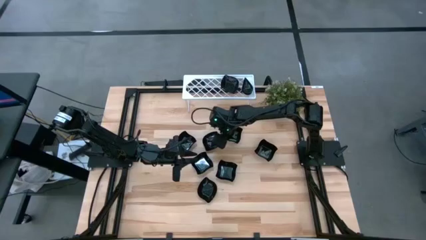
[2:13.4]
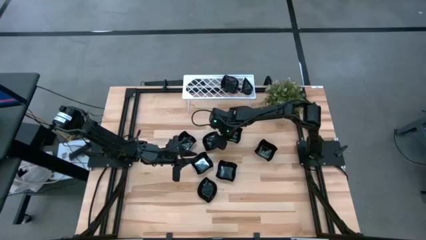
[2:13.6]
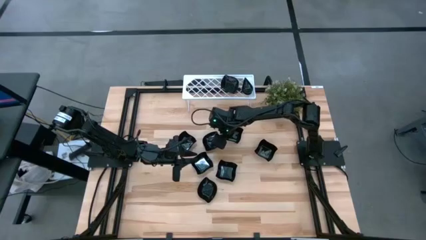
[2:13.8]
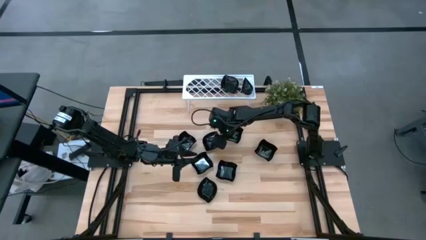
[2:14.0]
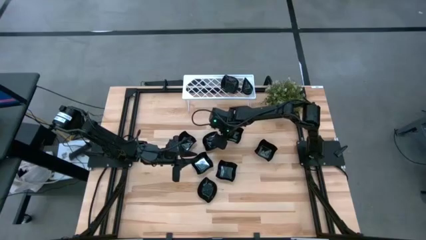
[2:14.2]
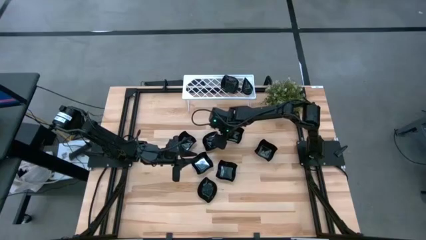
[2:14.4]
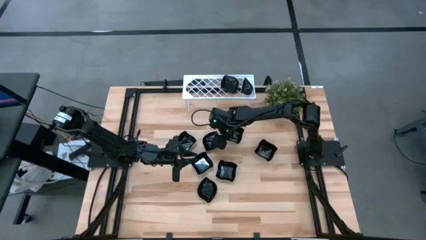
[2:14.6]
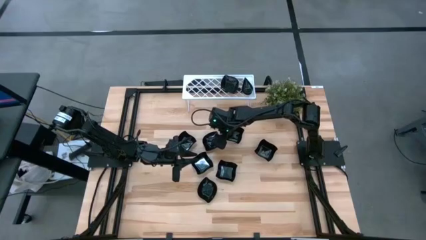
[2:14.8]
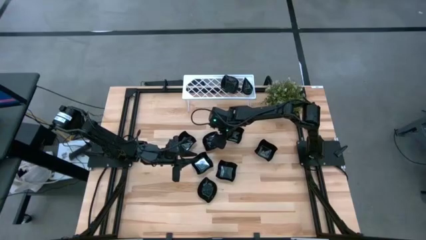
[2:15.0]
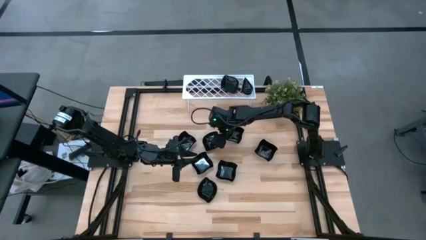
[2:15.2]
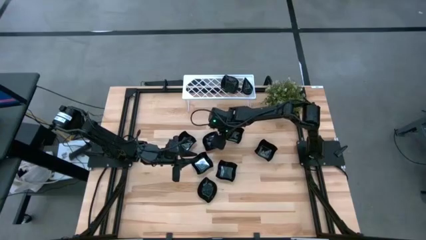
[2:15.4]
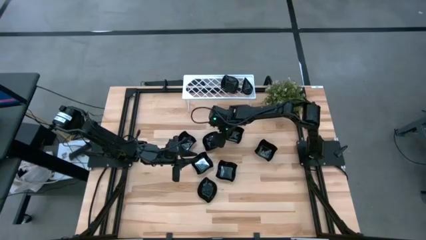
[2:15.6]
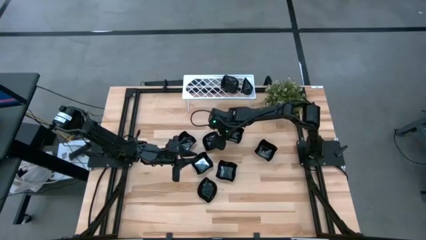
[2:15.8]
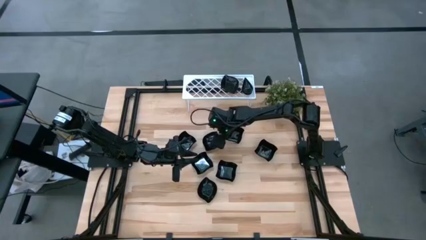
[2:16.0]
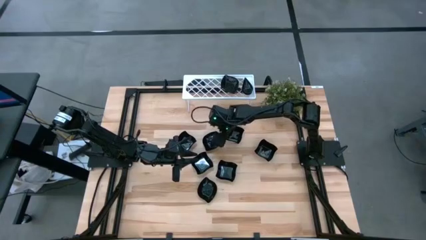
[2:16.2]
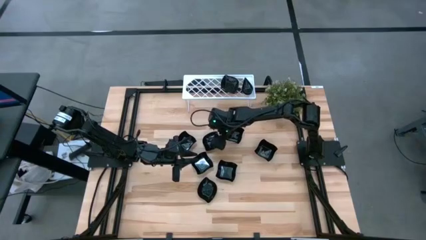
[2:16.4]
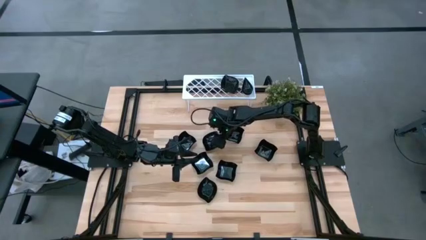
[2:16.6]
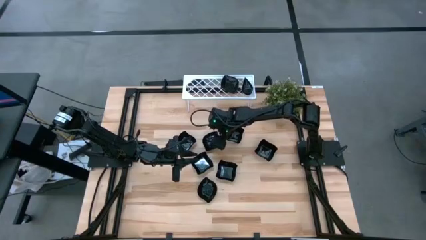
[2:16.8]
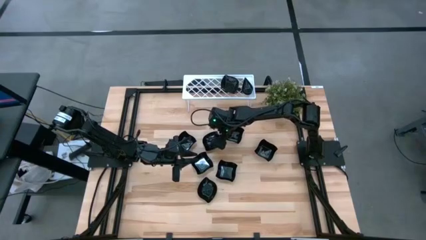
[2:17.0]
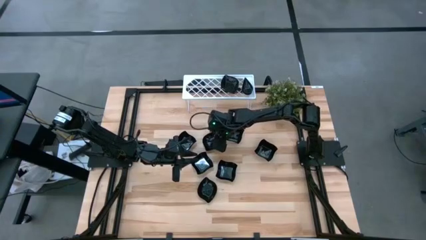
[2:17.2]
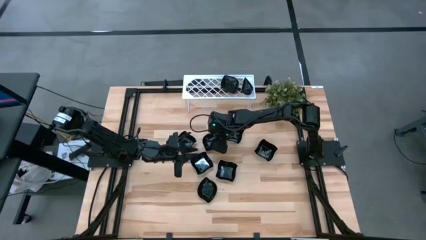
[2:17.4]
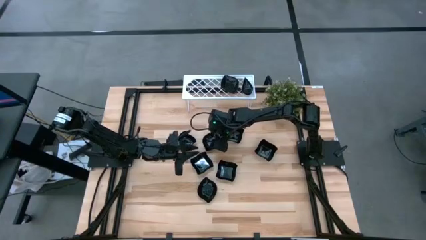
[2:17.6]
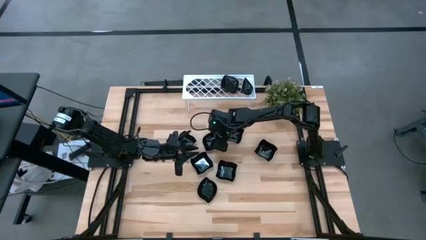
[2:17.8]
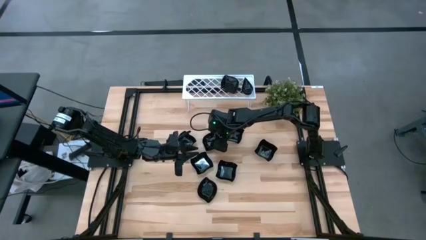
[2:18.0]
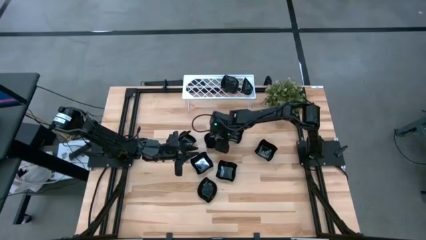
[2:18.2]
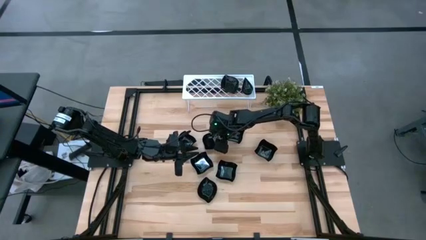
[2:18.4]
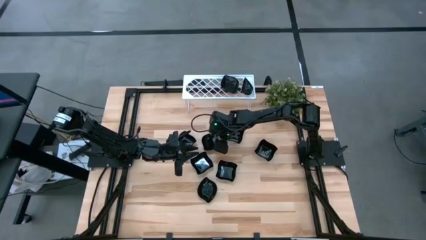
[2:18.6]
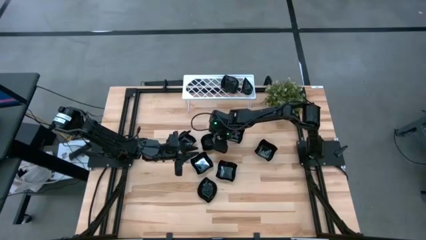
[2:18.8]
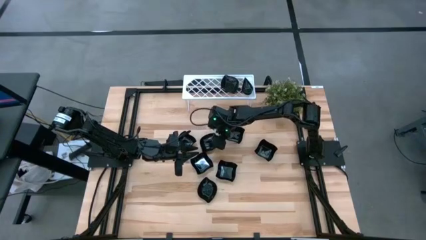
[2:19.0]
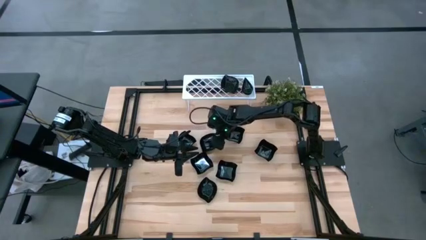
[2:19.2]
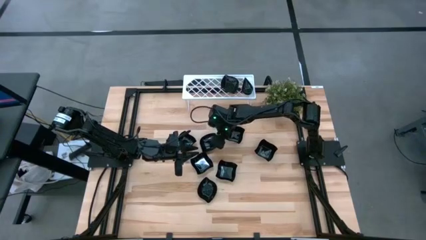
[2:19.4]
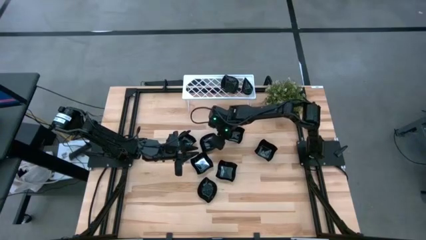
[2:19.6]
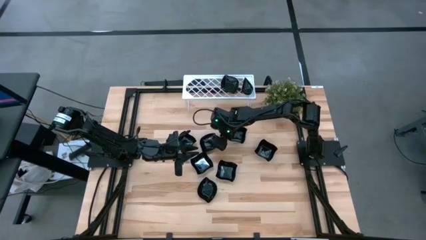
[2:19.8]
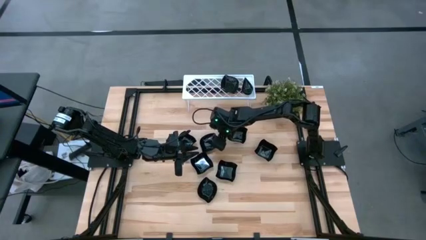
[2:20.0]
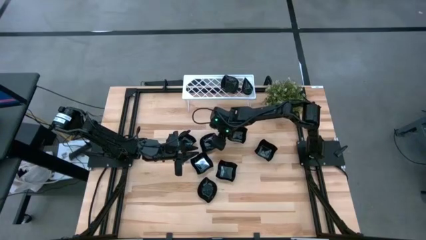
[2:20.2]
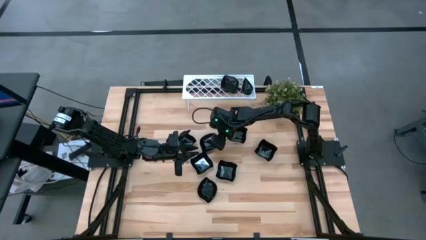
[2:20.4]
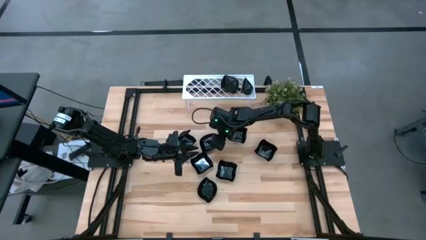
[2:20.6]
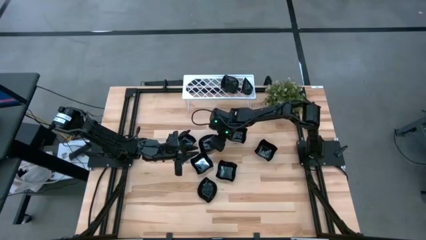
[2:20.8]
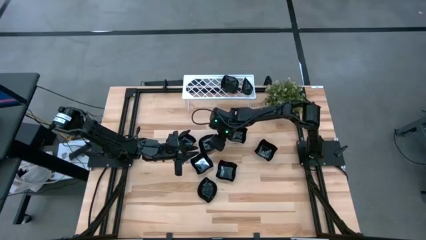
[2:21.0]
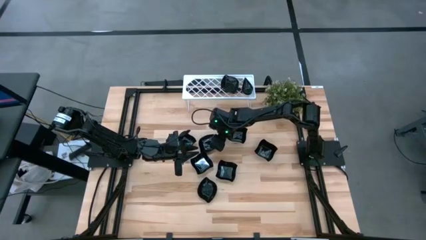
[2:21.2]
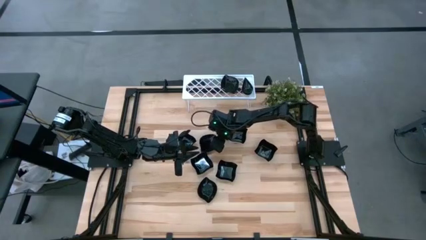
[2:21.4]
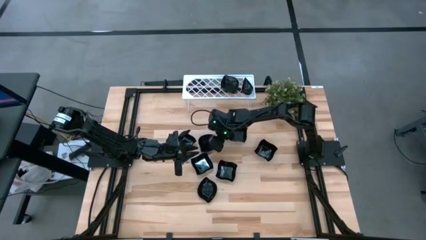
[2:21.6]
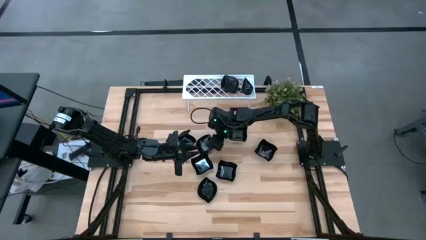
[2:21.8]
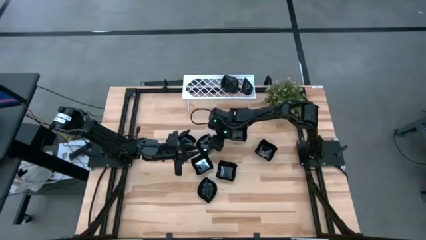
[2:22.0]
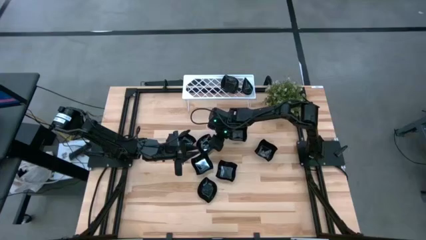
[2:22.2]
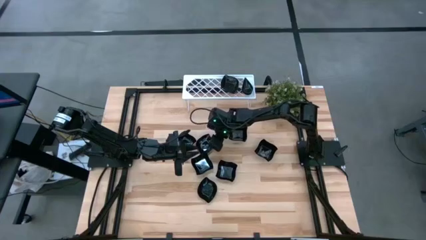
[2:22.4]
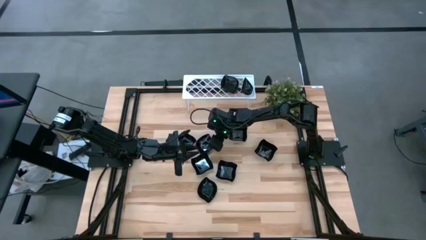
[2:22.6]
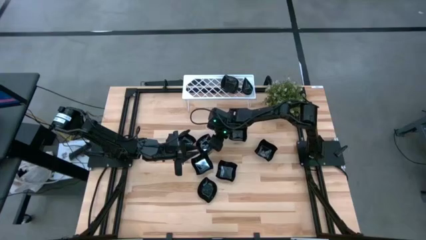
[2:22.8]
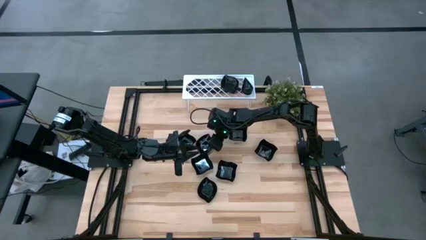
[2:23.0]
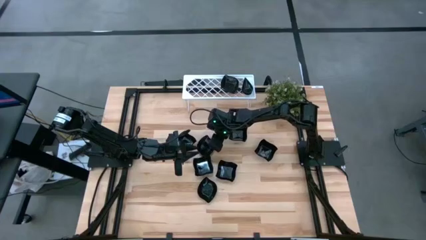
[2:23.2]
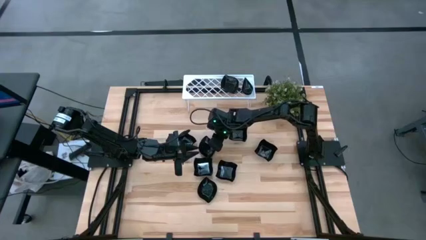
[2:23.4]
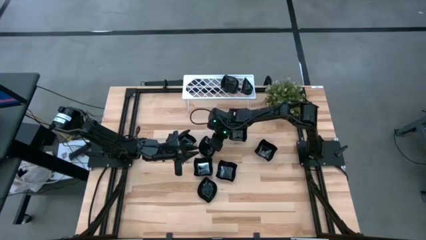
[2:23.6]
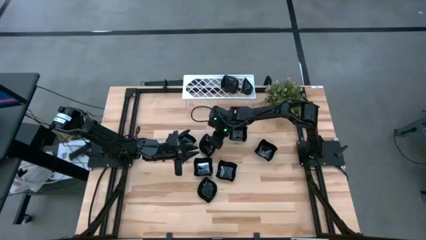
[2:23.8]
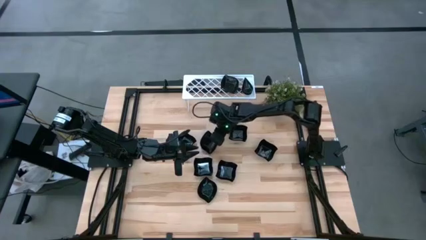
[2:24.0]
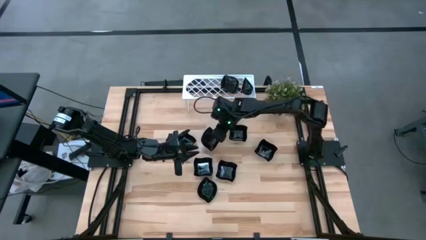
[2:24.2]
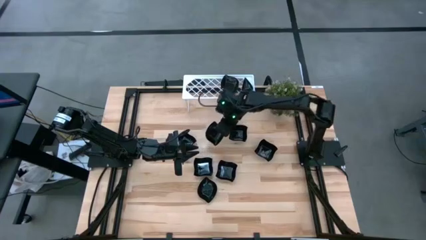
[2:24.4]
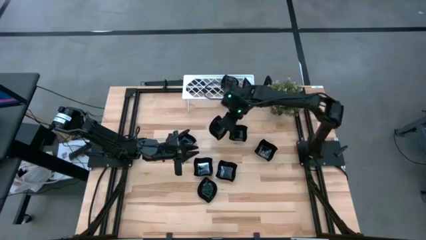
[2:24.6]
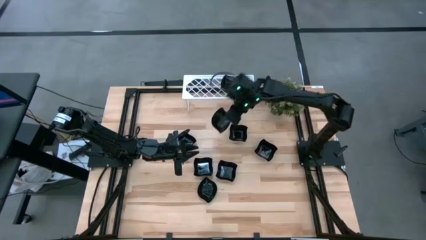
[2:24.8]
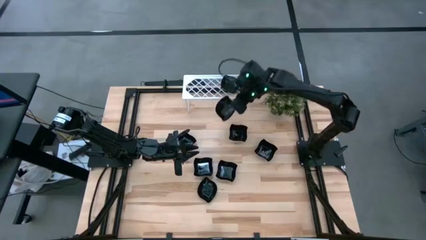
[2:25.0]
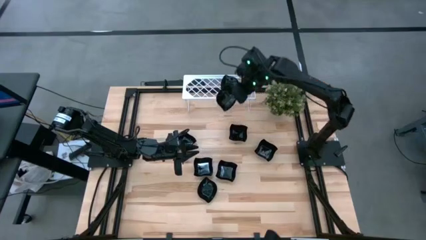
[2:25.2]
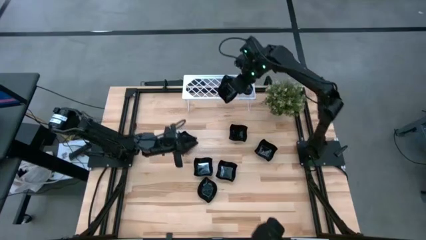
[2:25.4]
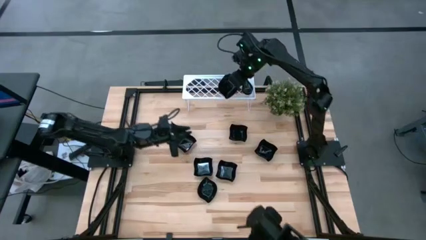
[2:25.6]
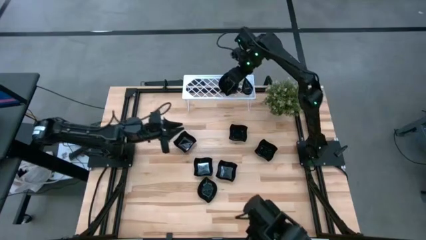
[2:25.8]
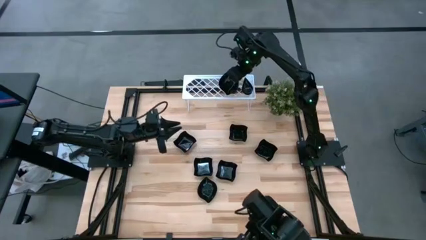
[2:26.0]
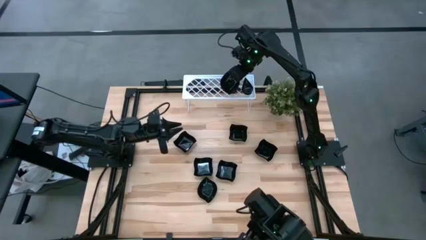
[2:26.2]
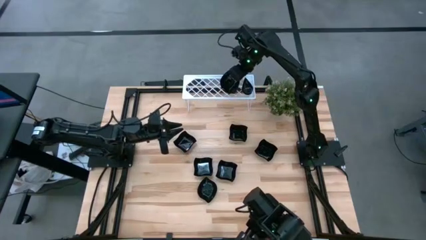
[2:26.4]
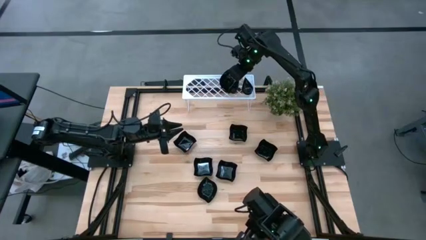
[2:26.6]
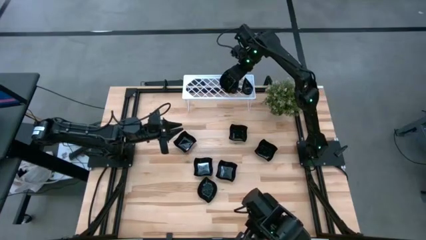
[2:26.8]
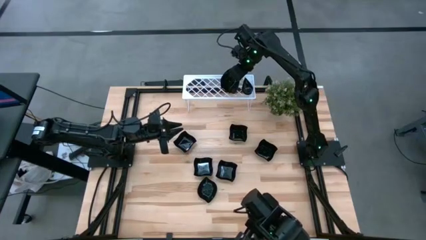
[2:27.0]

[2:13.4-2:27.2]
Task: Pick & Place Mini shaped plates
Stack the leaf shaped plate on top of the leaf shaped plate on the shelf

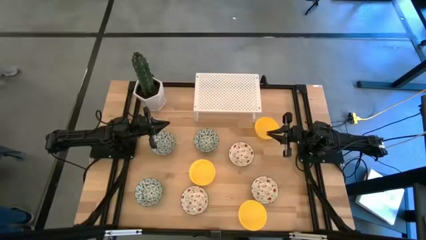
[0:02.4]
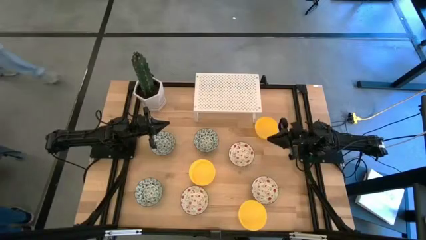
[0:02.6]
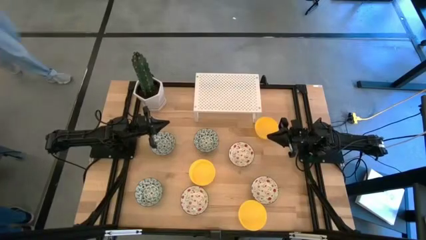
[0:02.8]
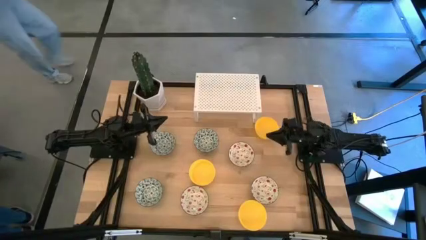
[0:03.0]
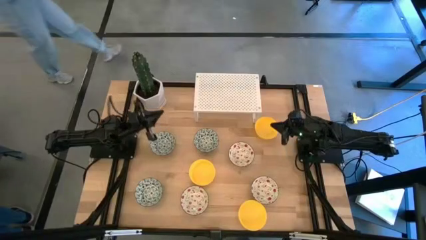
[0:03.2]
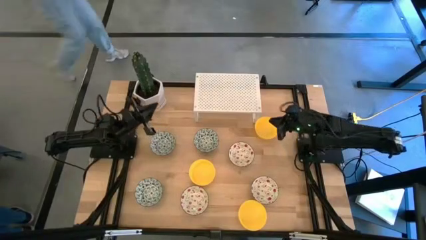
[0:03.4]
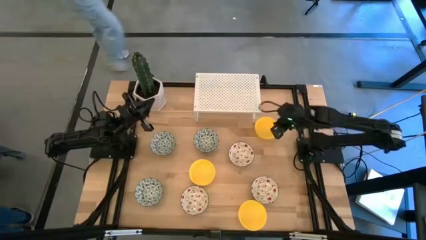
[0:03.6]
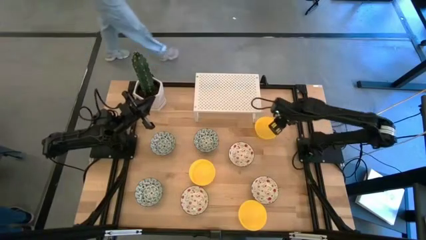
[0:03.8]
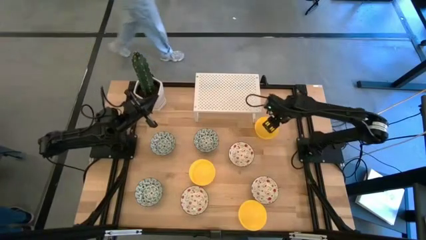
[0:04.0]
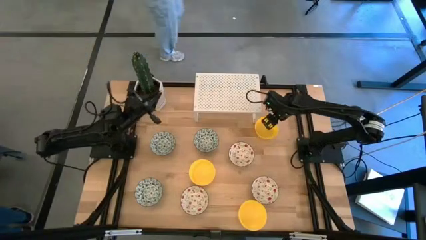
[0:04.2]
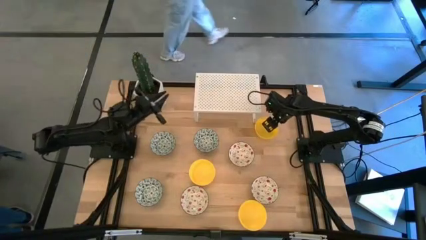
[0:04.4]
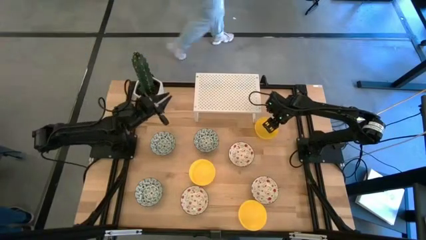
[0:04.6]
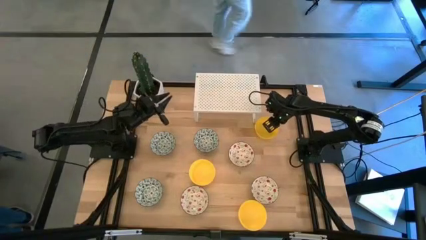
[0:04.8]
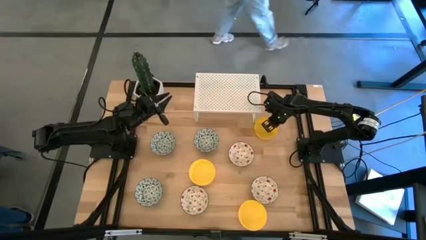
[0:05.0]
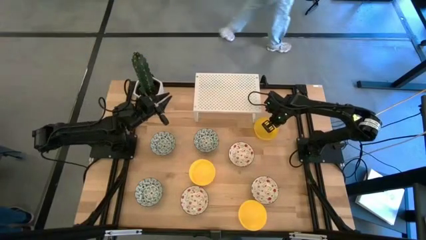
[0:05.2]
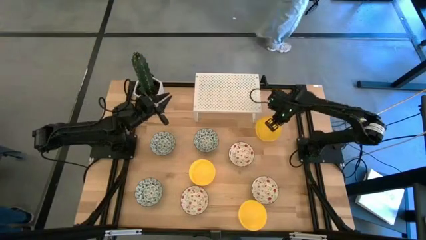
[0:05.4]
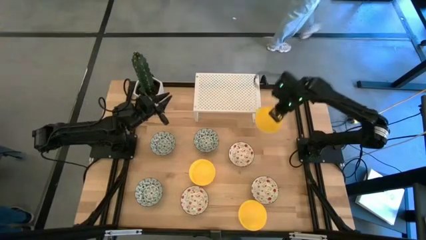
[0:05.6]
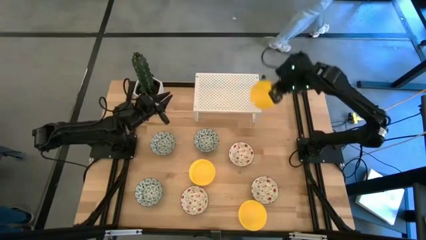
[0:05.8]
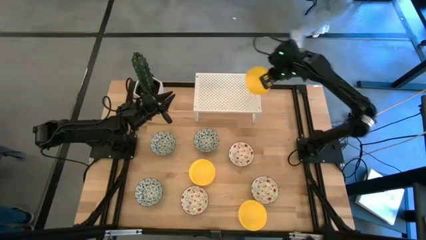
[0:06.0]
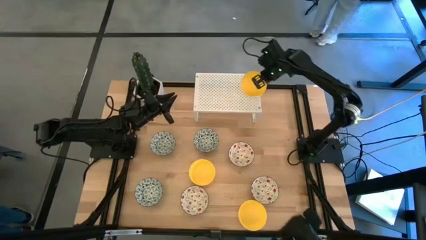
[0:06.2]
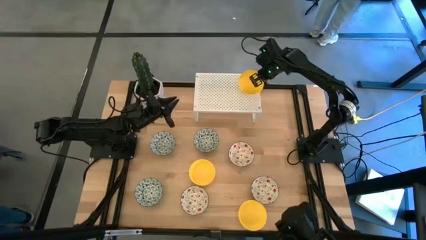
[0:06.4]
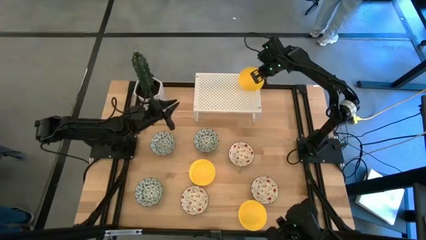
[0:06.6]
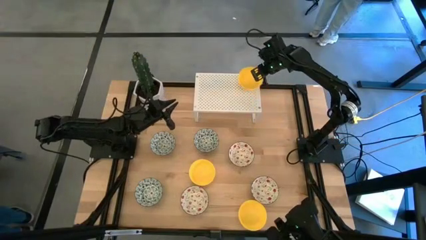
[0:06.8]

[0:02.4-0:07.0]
Task: Pick & Place Mini bowls
Put the top yellow bowl on the shelf
